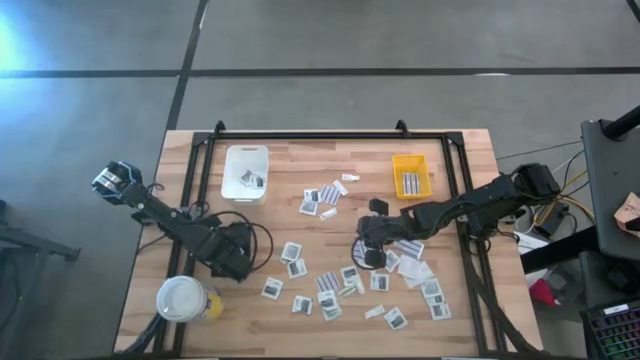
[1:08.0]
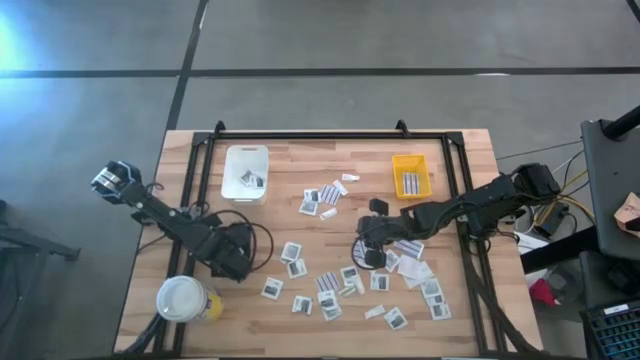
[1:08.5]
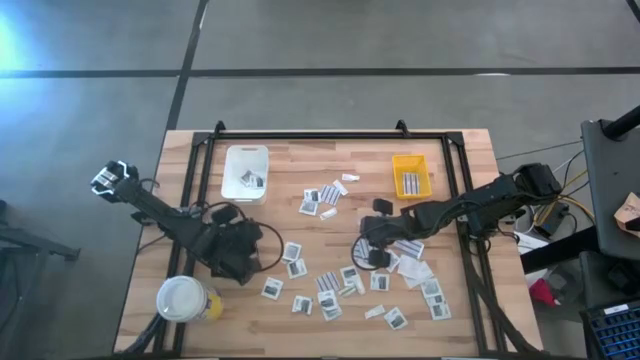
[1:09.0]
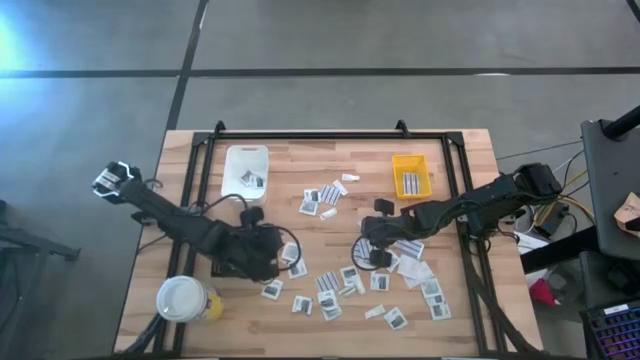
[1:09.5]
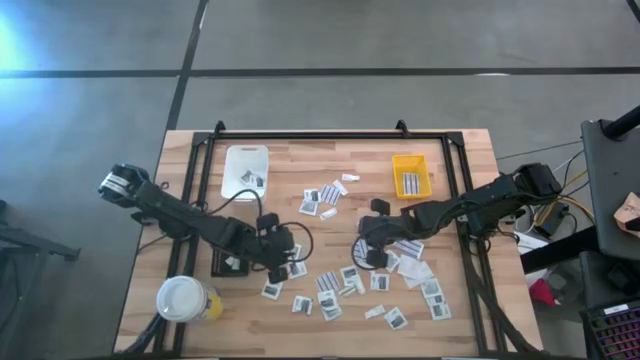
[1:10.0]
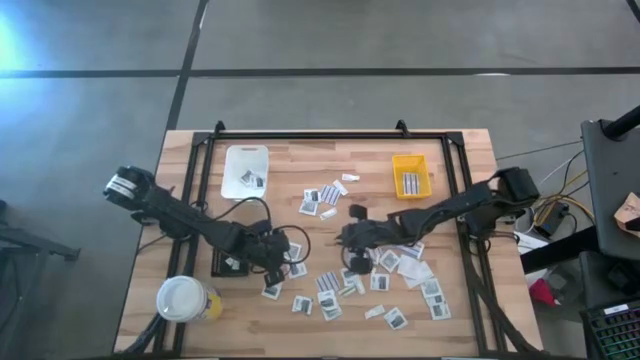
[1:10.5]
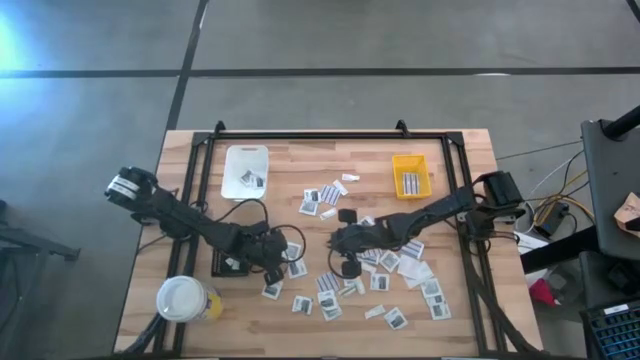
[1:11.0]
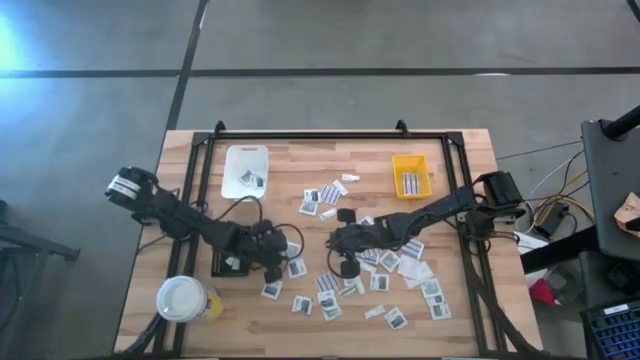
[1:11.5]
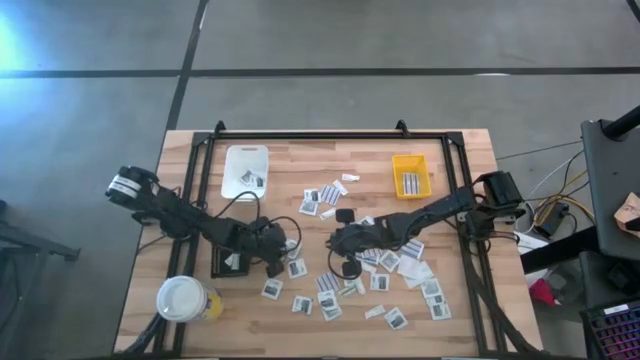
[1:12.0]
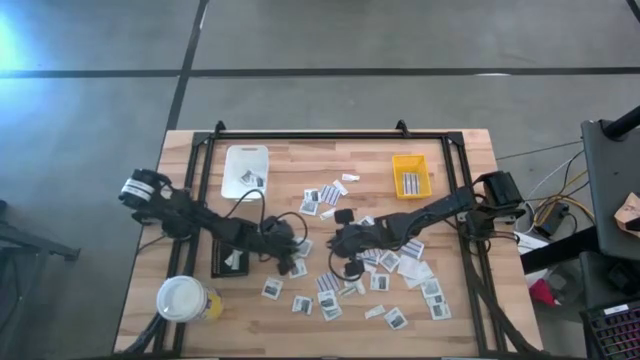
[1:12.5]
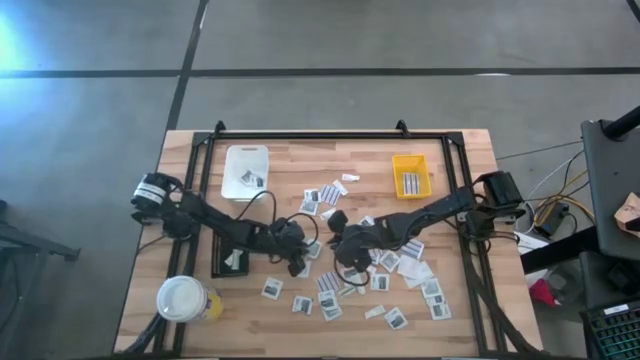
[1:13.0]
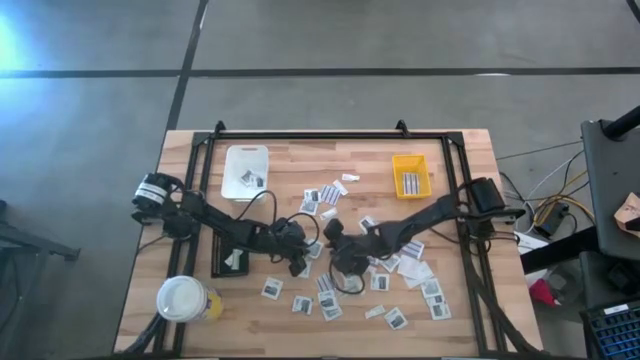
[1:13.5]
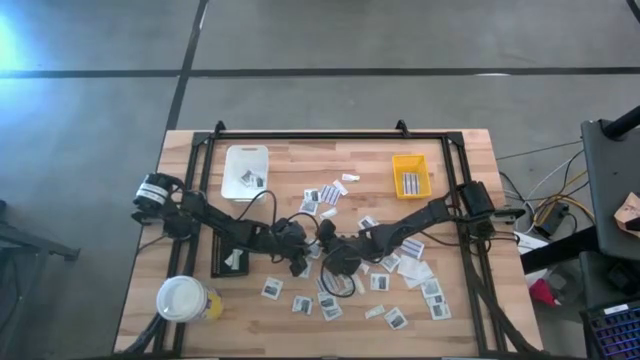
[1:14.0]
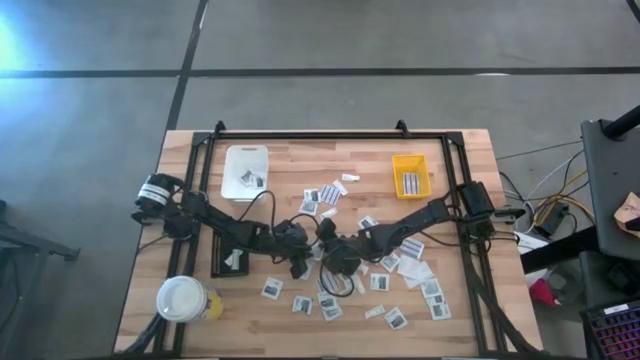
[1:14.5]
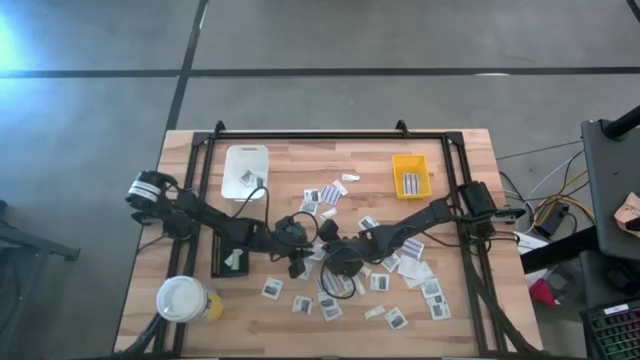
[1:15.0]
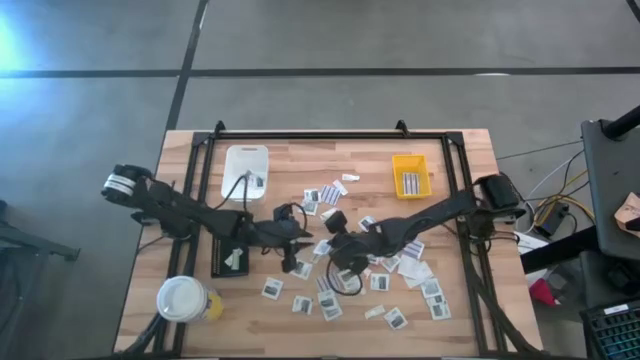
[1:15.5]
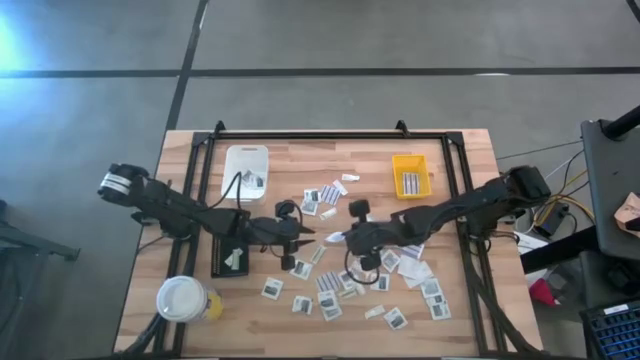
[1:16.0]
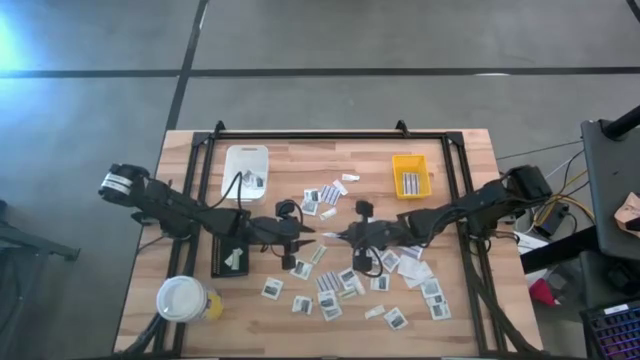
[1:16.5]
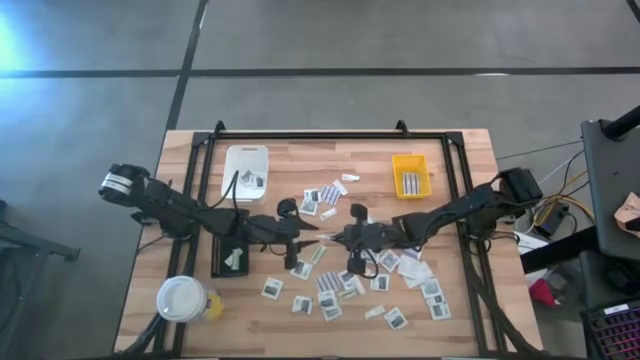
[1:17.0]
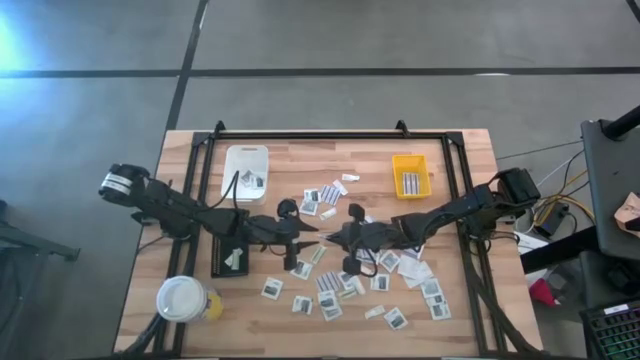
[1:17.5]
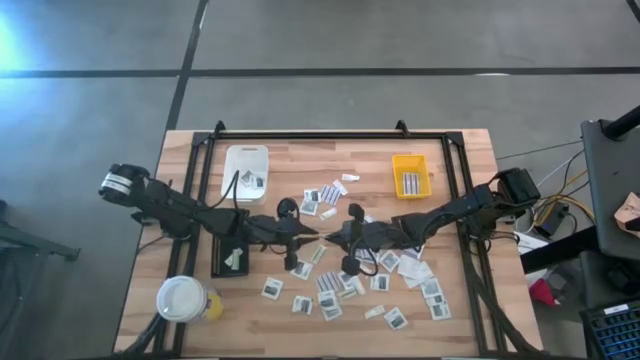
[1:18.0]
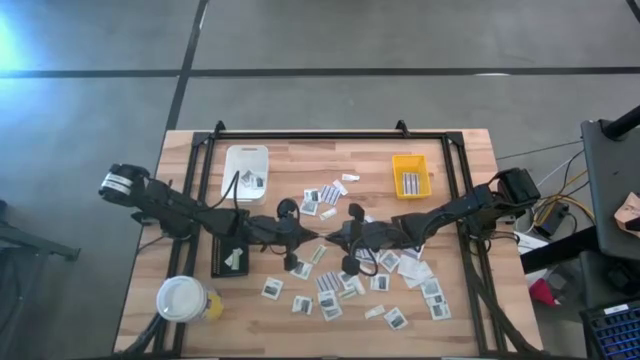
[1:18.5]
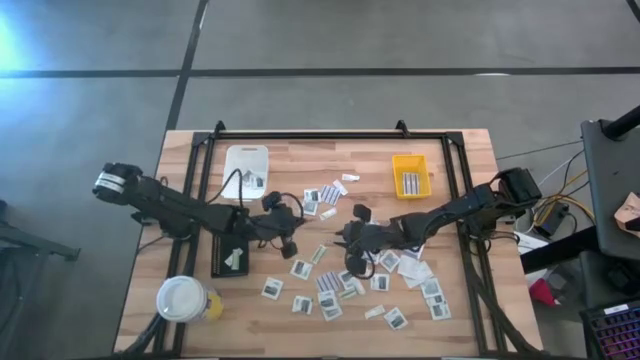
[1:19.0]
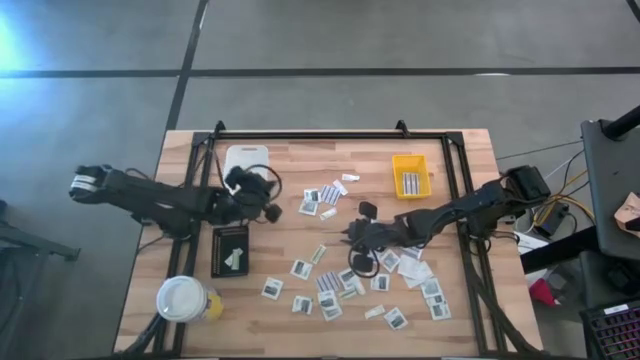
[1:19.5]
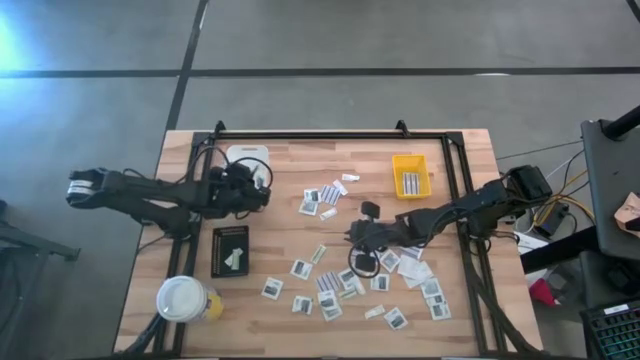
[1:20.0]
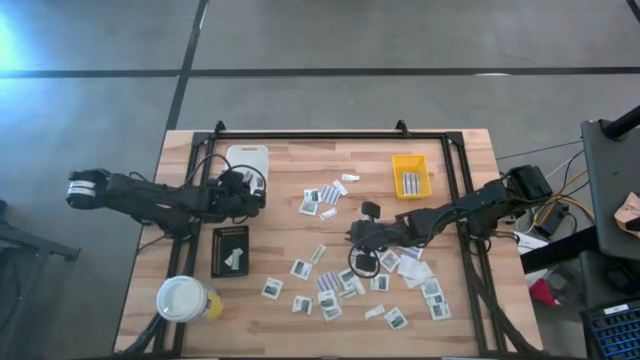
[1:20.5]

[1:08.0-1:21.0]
Task: Pick & Place First Aid Supplies
Put the gray towelette pack into the white bin

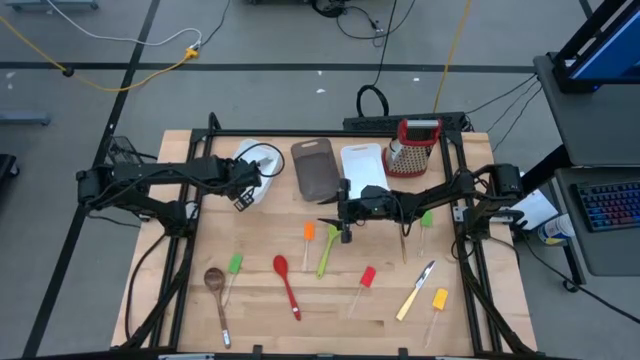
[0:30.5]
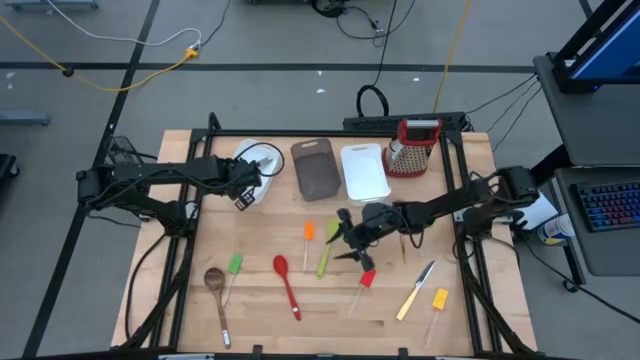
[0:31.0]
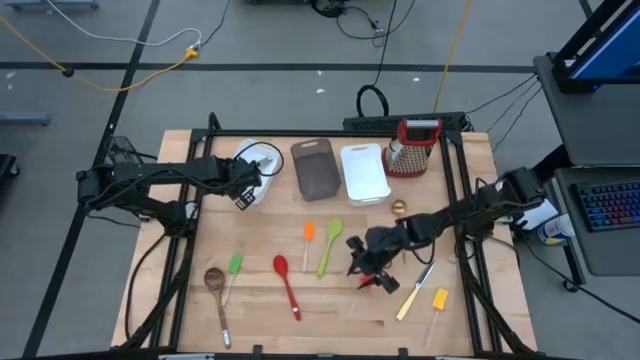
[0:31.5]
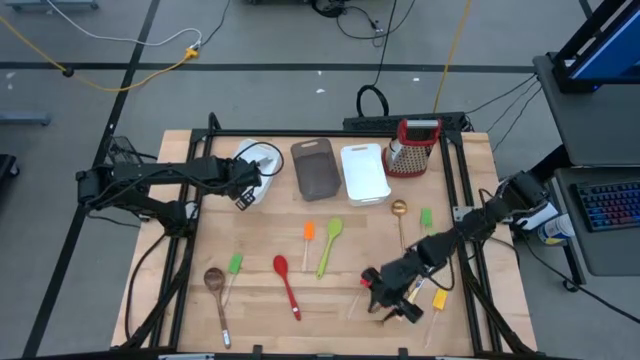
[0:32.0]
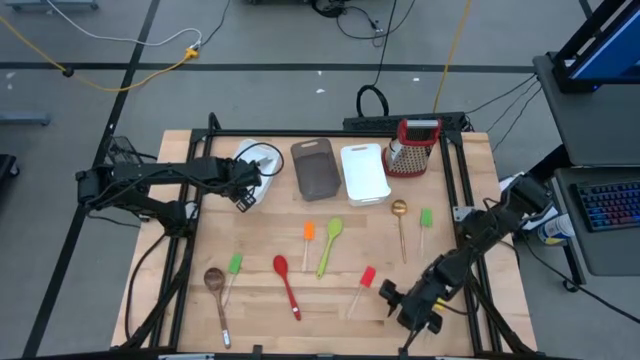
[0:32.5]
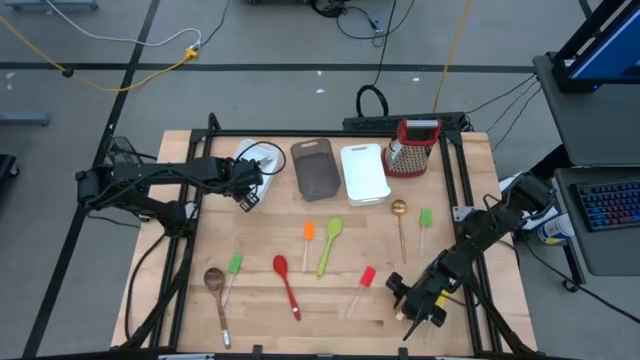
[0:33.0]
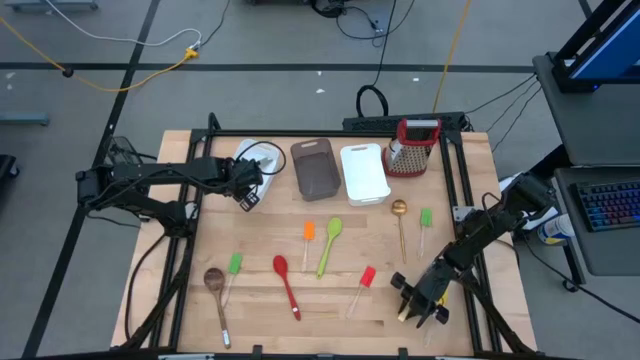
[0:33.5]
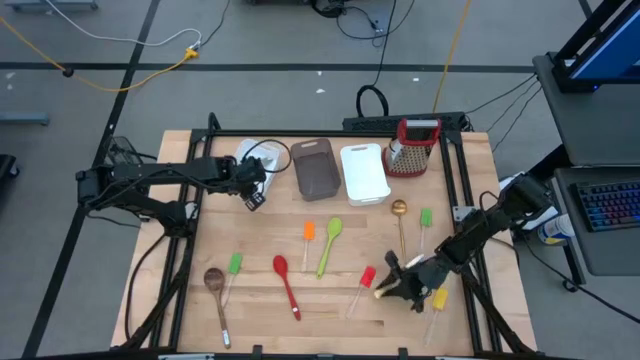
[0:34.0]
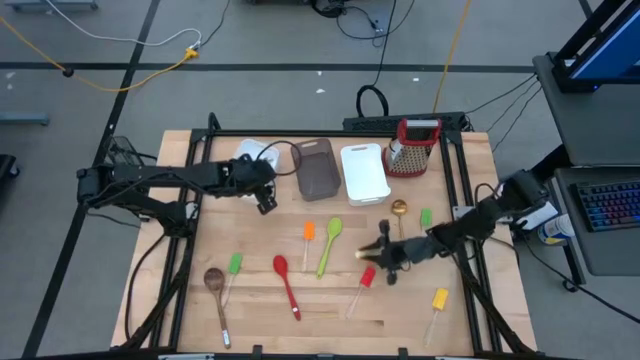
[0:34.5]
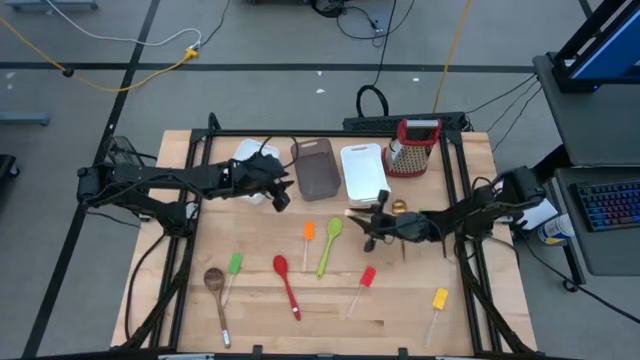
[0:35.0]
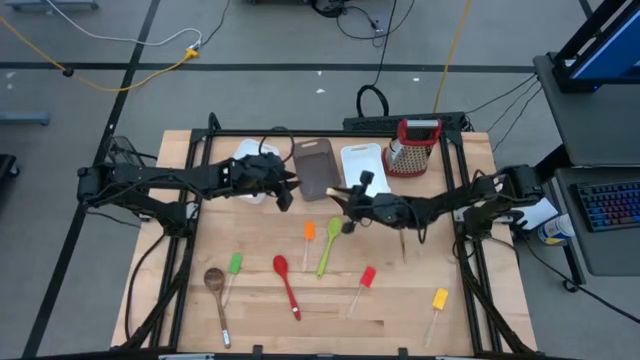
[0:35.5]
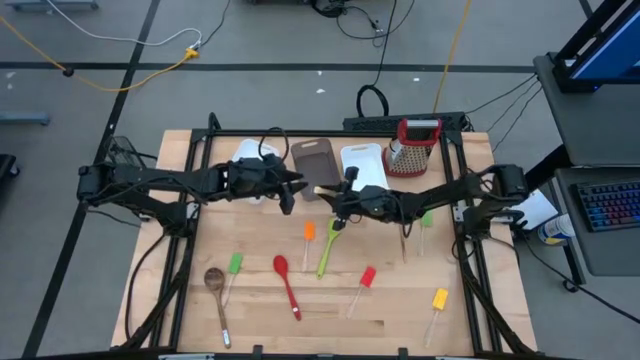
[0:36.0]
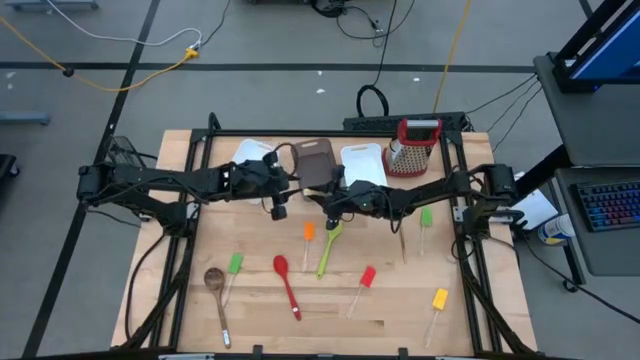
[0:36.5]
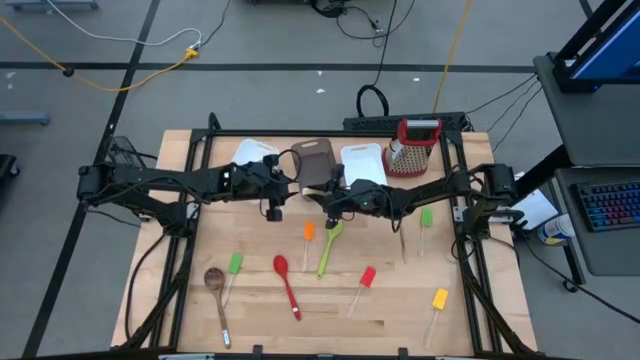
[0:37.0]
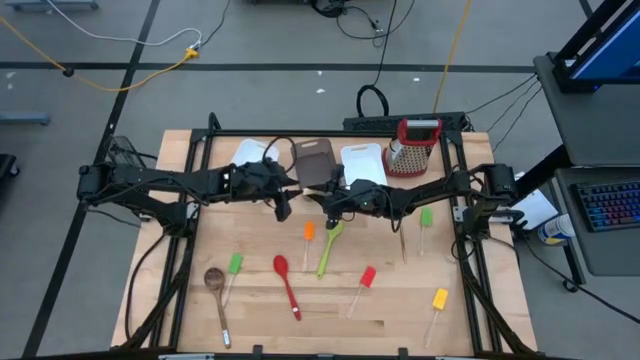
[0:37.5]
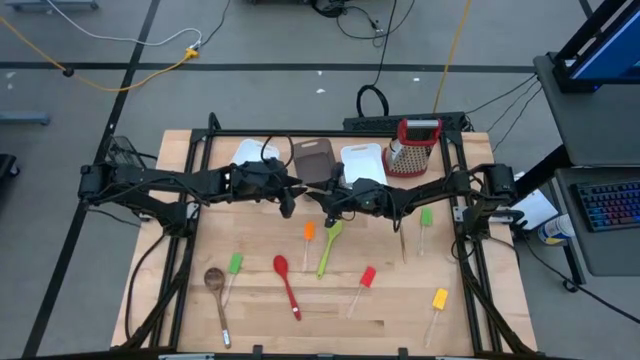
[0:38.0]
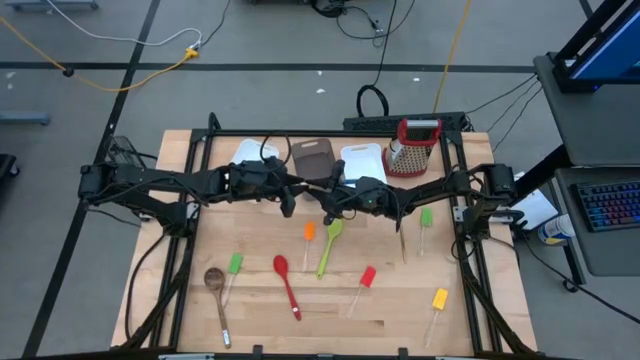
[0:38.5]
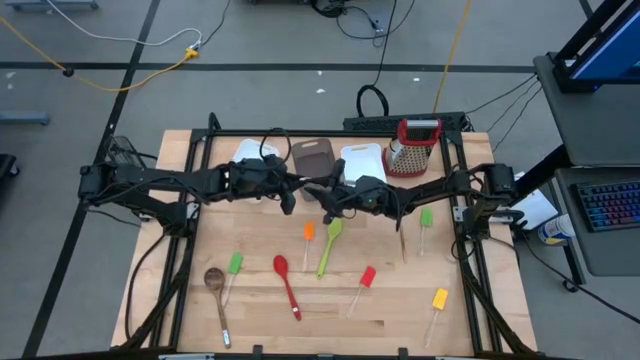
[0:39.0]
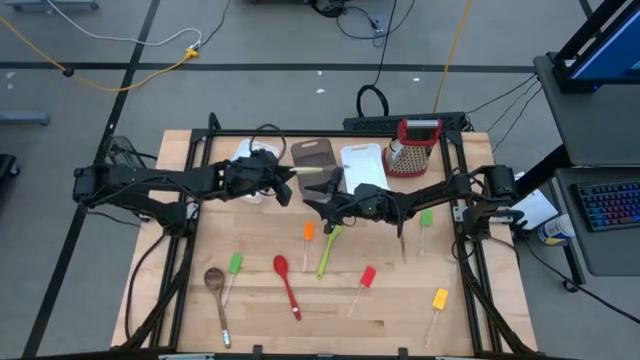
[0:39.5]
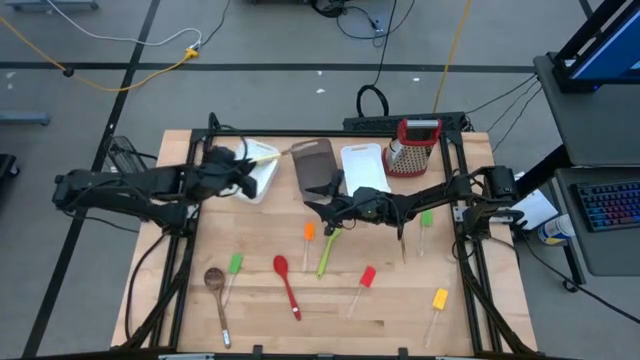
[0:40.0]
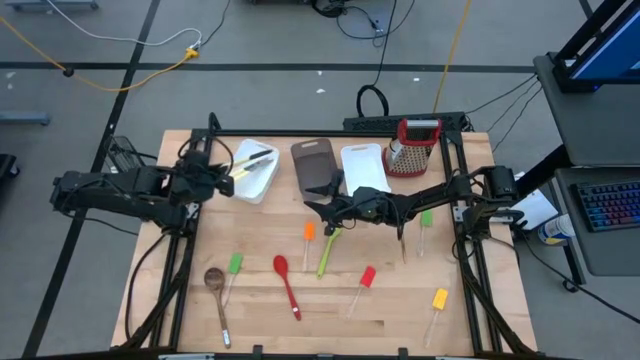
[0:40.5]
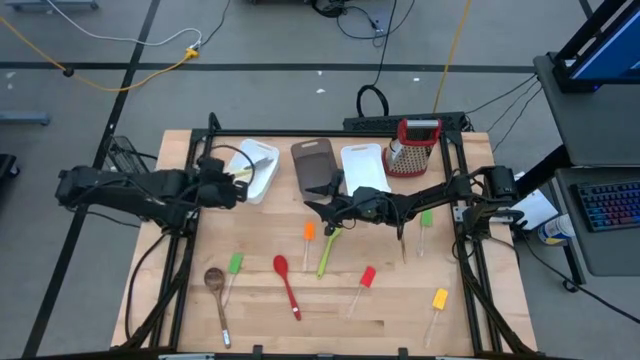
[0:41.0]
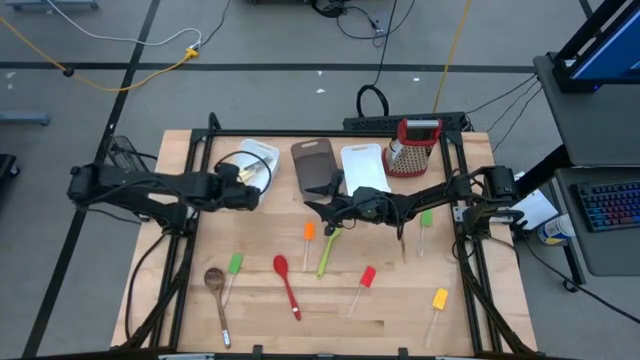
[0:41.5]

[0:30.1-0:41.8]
Task: Pick & Place Kitchen Items
Put the yellow knife into the left white bin
